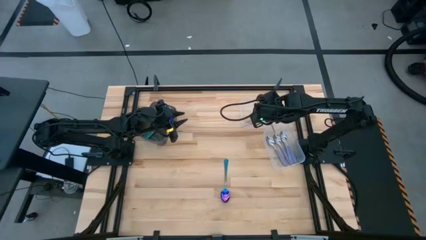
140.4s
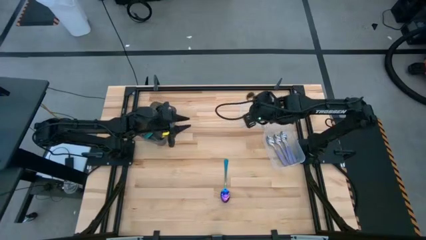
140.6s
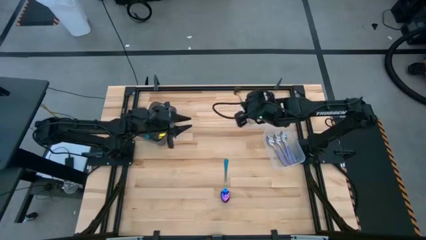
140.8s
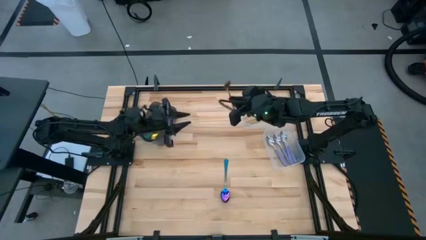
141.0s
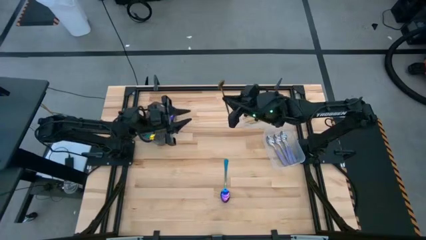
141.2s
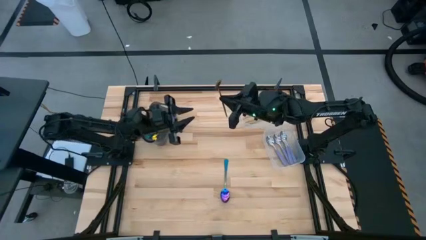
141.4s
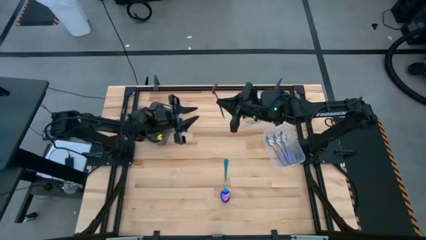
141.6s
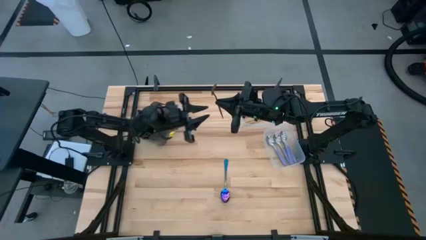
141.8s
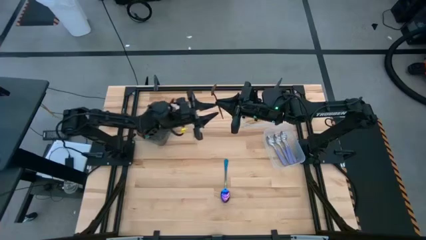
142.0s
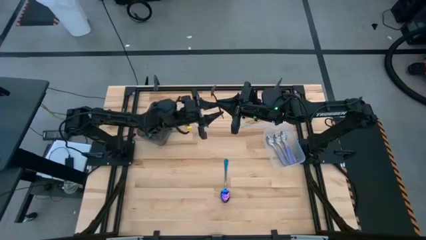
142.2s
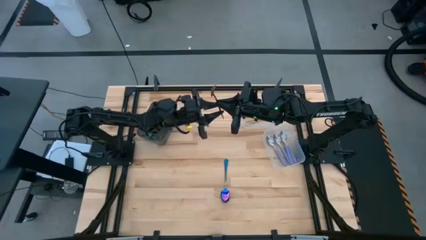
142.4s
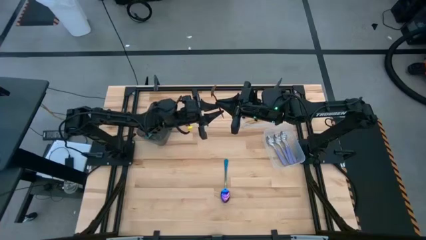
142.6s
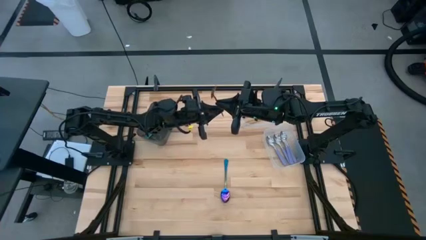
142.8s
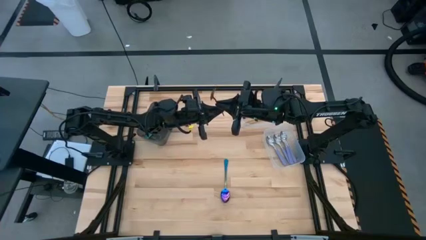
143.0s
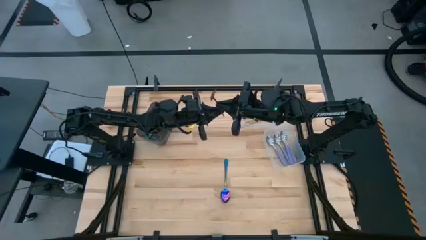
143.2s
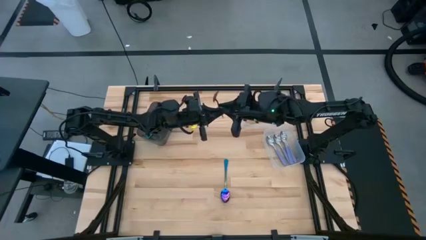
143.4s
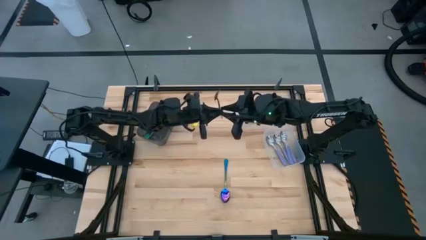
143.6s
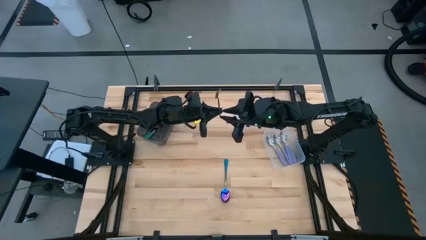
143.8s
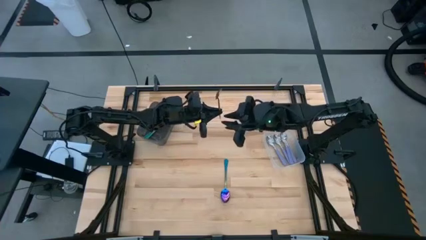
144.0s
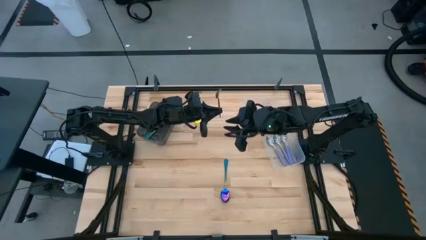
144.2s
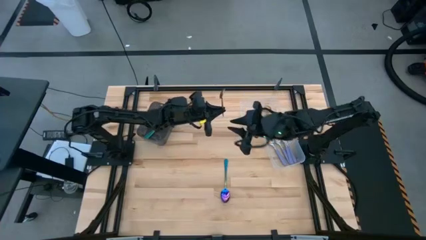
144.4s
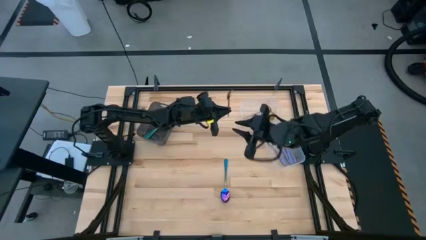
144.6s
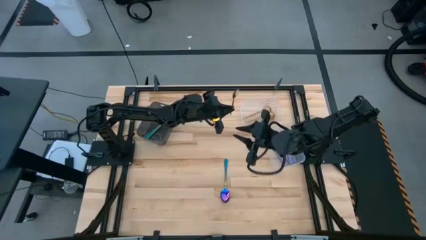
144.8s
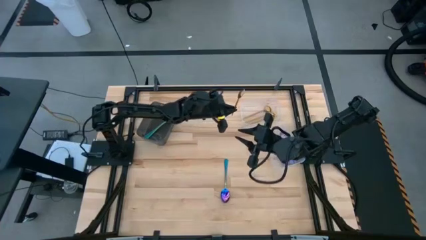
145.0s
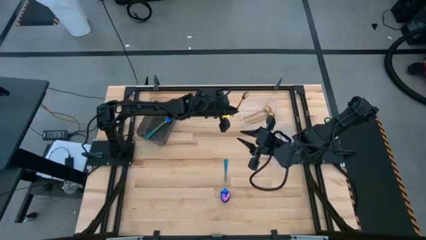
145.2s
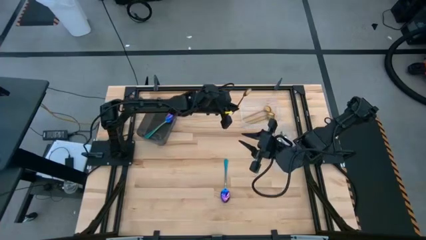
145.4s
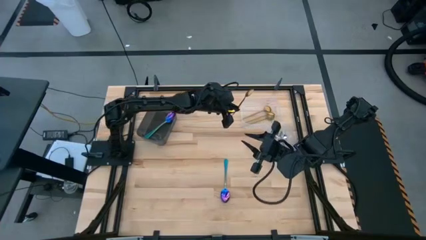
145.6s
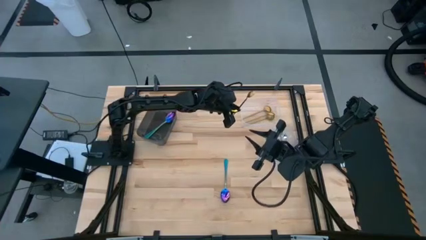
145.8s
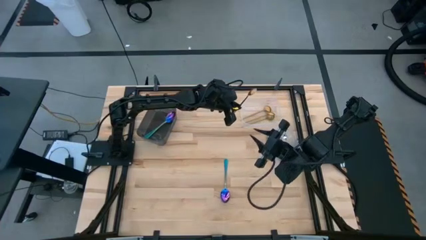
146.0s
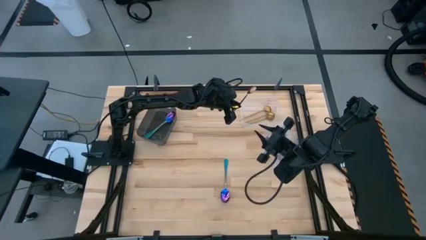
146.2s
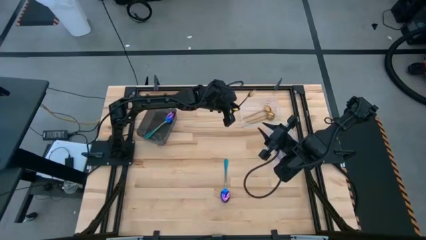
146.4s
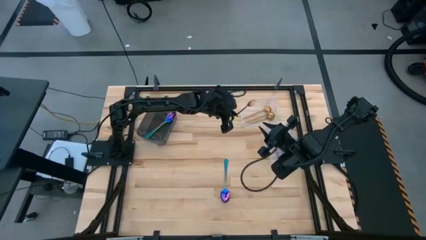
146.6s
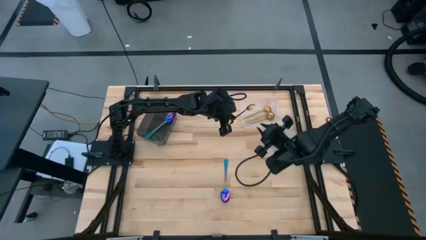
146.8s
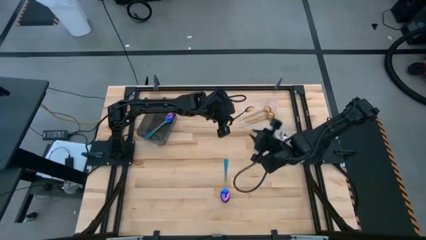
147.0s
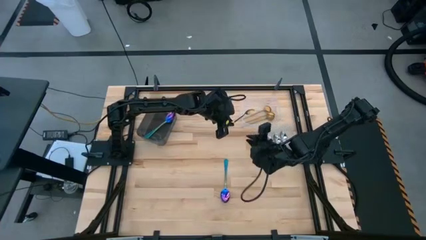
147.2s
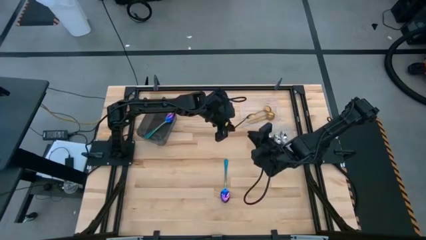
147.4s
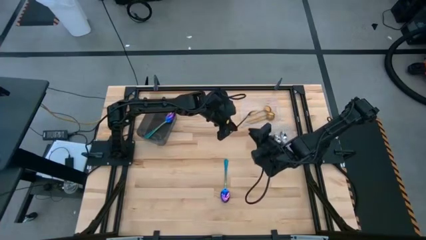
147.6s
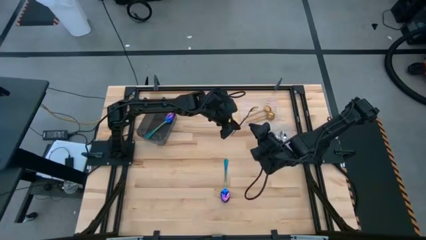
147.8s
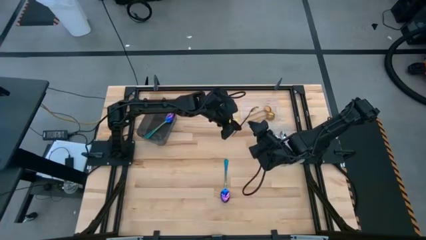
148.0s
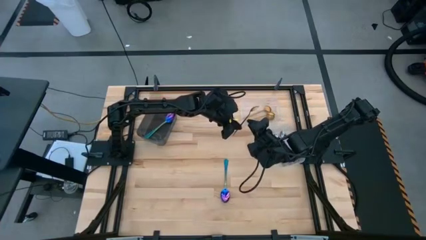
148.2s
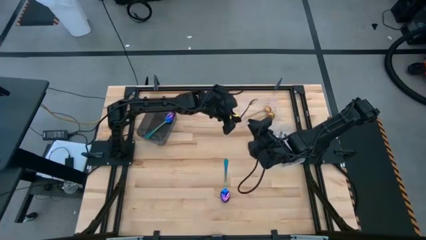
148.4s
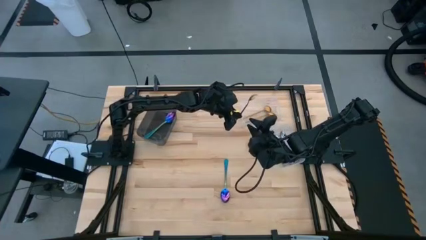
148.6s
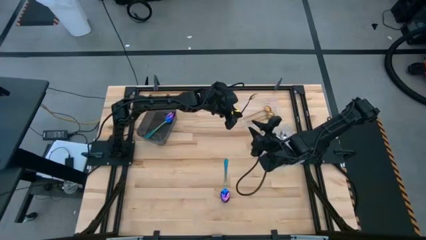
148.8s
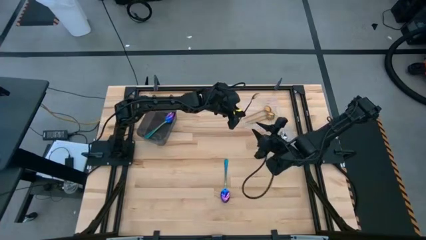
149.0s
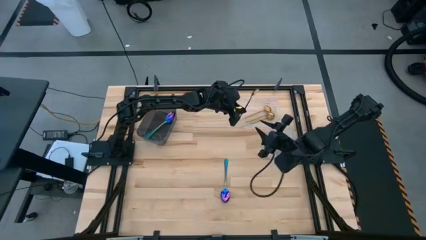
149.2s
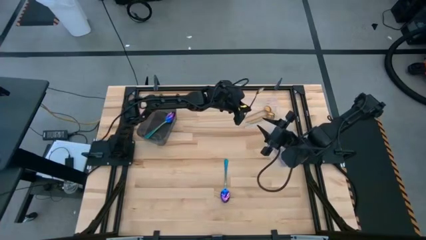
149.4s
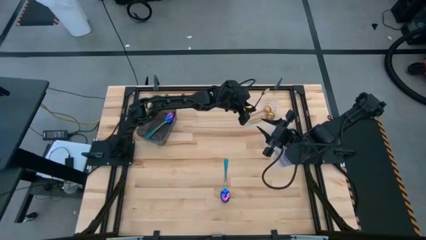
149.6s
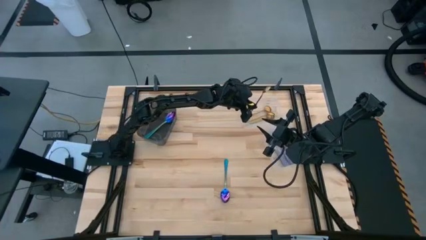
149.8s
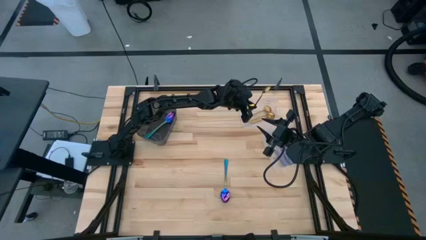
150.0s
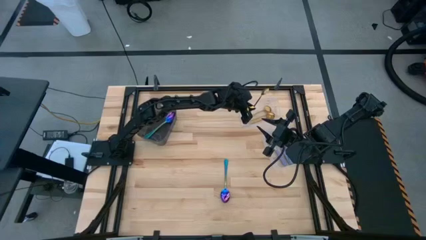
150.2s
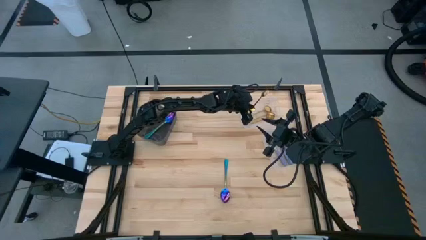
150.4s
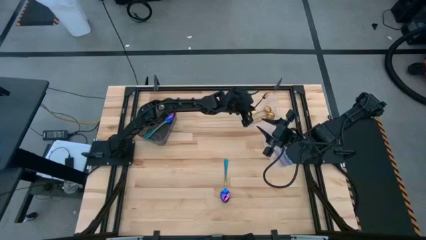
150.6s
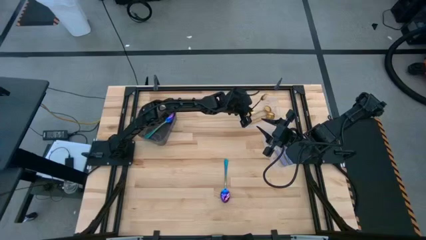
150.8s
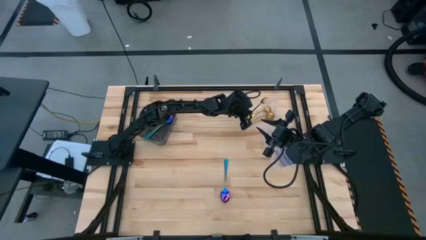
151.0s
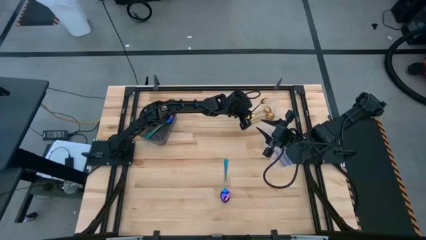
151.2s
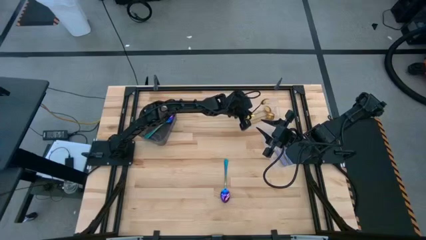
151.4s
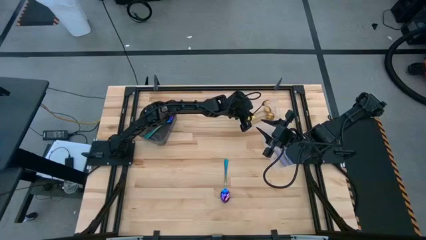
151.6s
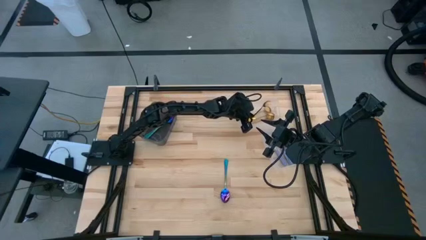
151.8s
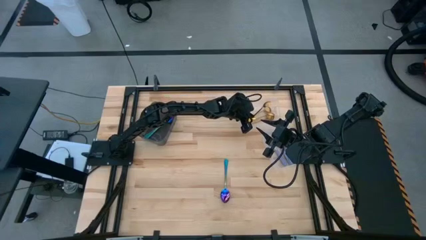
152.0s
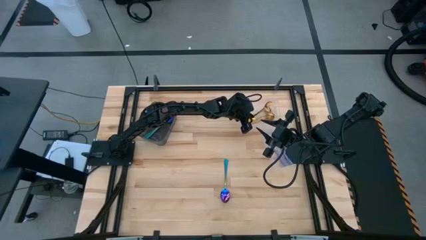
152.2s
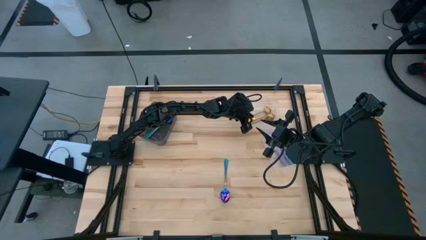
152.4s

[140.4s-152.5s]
Task: Sort silverware by color (type)
Put the gold spoon into the top transparent bin

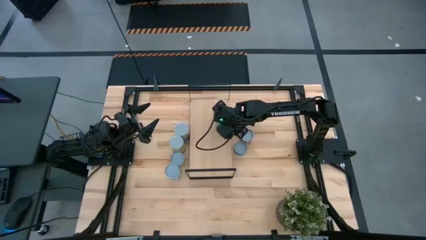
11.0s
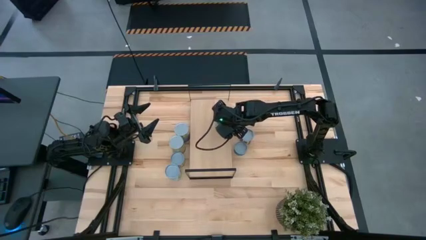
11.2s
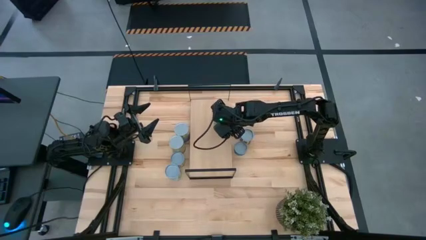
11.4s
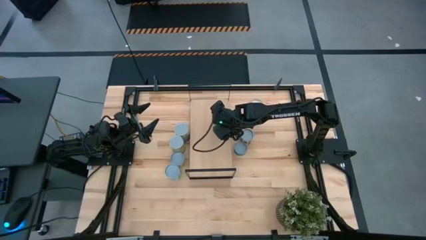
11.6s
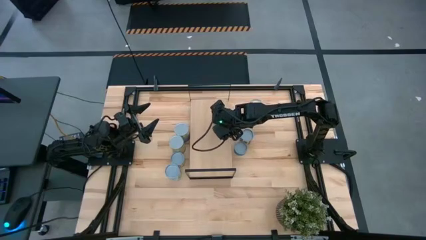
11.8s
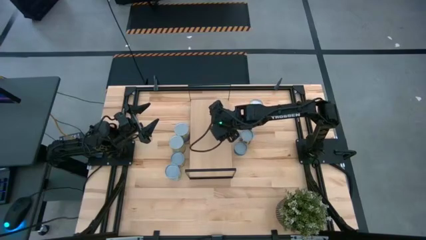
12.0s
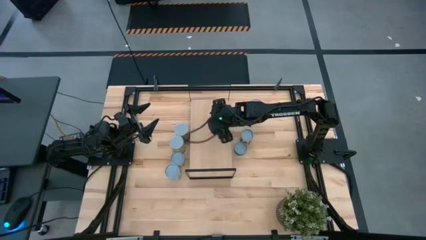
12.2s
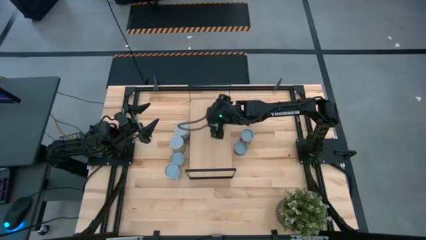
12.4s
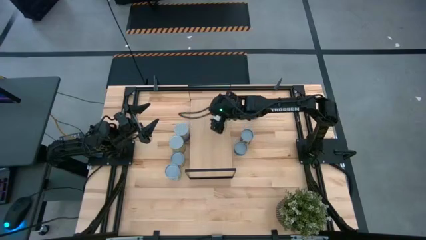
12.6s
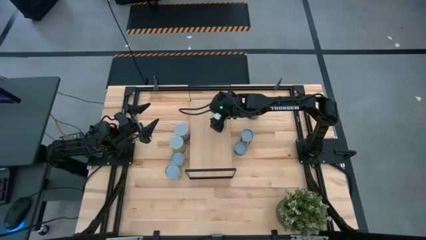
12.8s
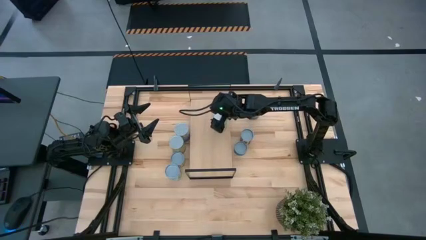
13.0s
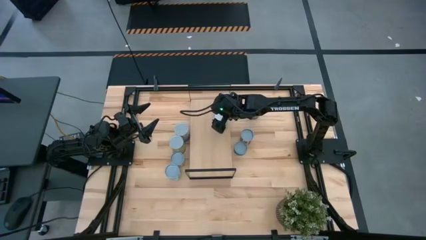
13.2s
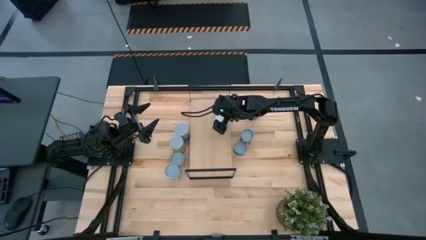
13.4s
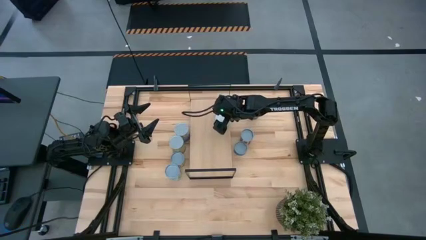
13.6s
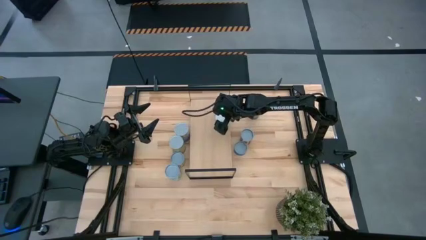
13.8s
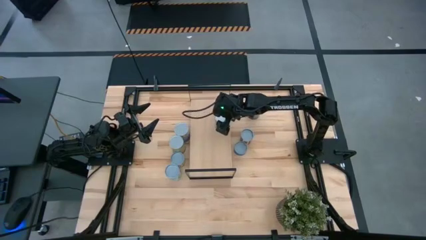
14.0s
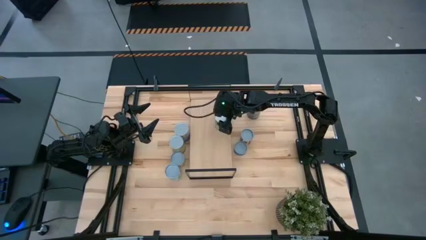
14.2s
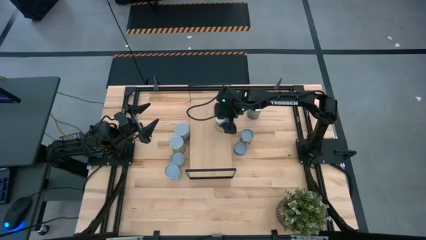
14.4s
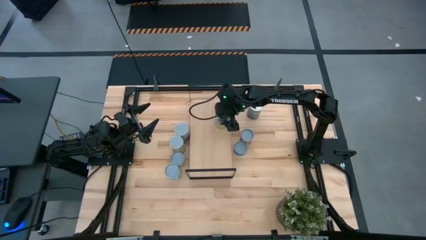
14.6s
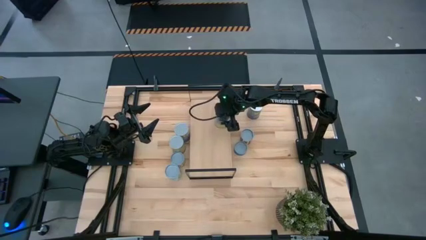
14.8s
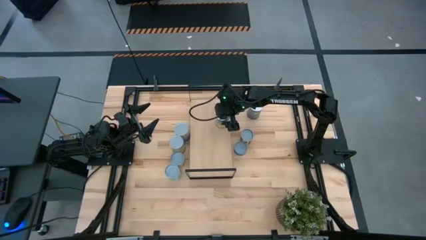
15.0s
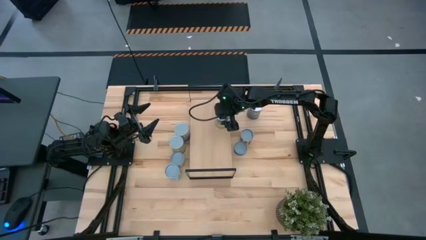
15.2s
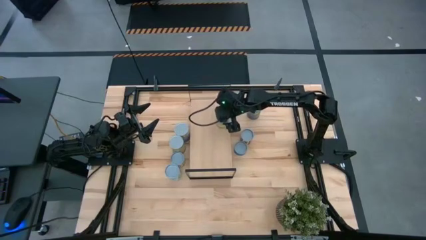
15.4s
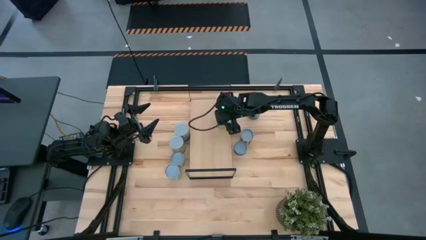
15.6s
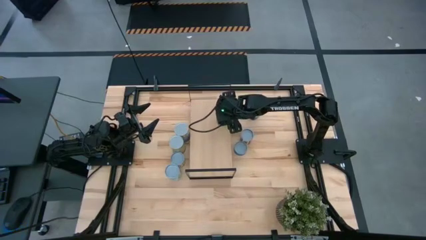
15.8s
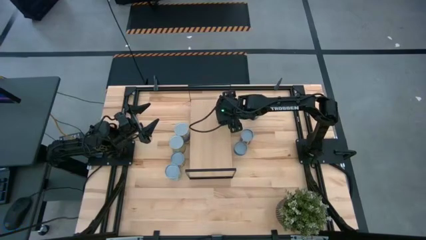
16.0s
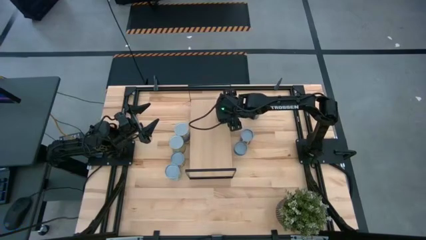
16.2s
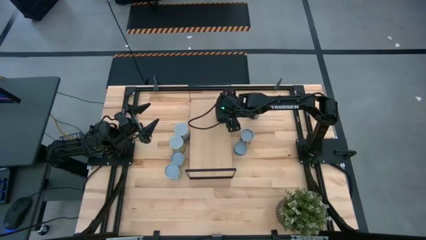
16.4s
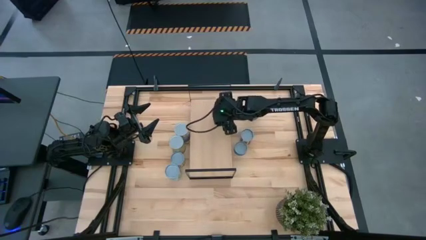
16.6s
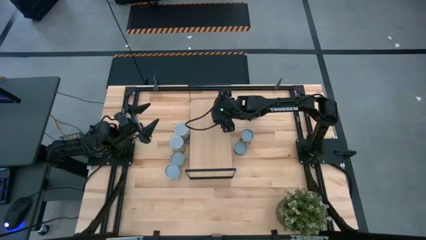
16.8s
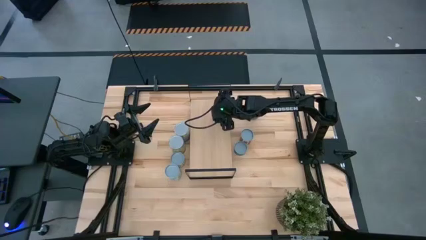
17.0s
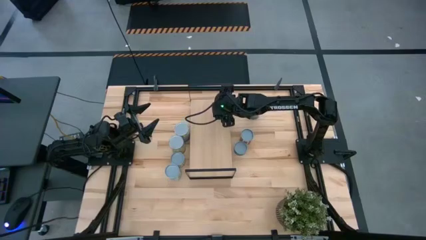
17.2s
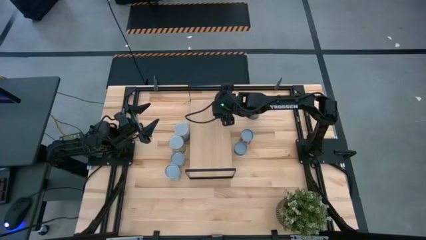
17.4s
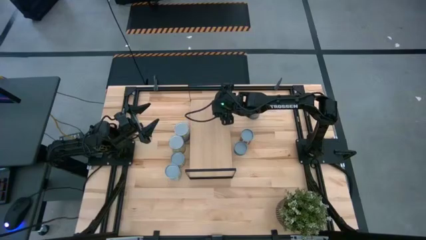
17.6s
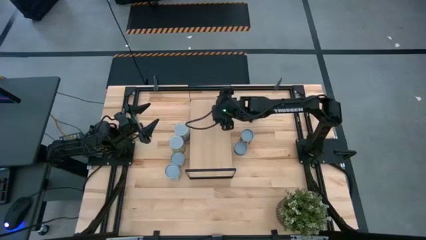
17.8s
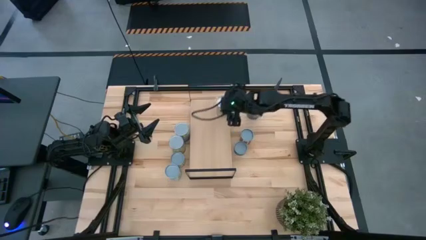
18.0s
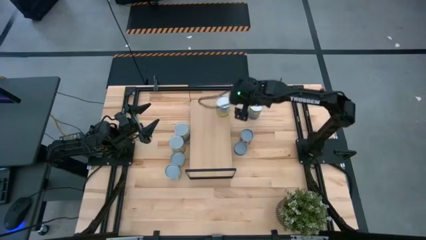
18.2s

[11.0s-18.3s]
Task: Pick and place cans onto a shelf
Adjust the canned carrots on the shelf
